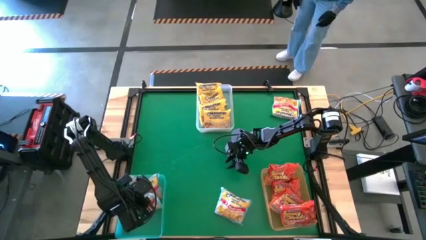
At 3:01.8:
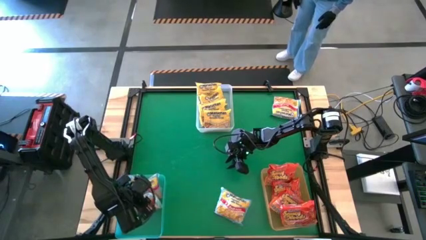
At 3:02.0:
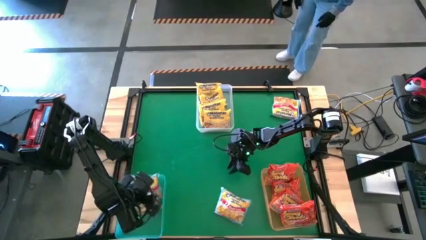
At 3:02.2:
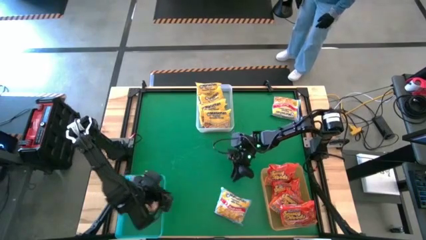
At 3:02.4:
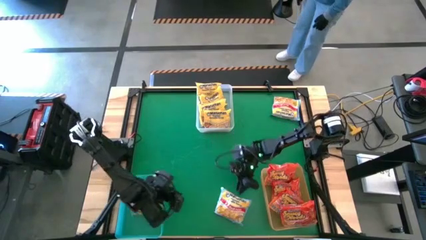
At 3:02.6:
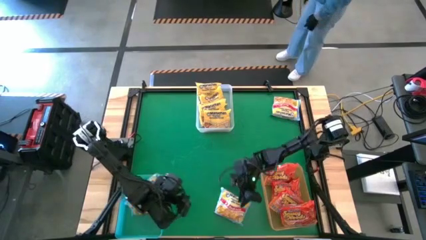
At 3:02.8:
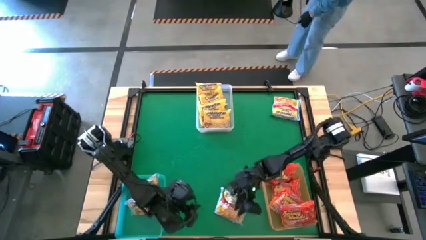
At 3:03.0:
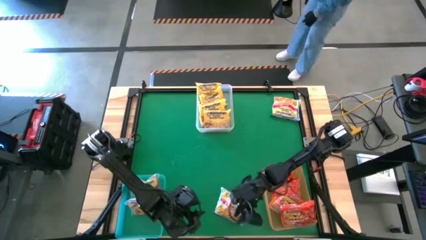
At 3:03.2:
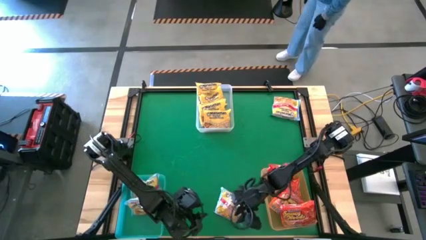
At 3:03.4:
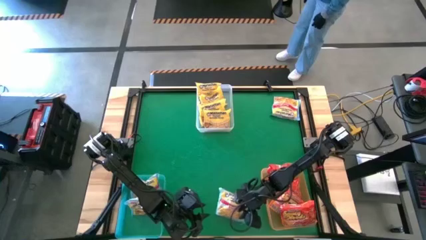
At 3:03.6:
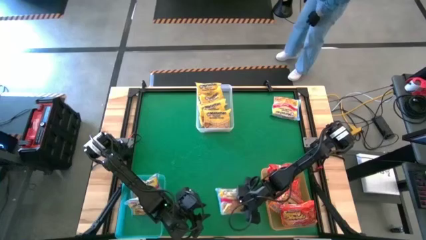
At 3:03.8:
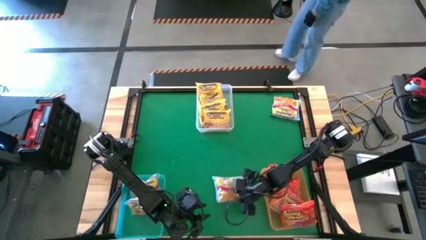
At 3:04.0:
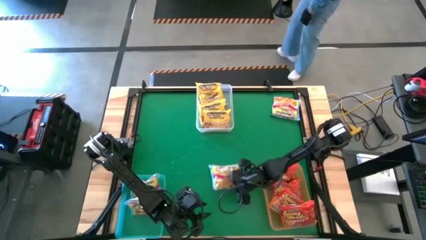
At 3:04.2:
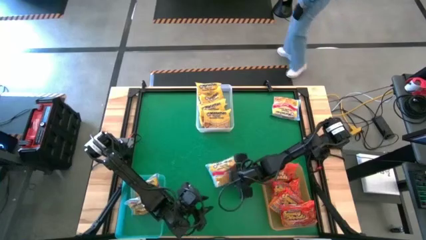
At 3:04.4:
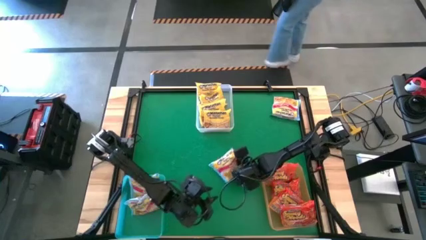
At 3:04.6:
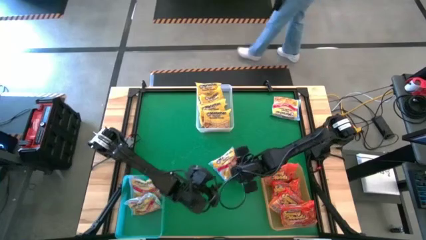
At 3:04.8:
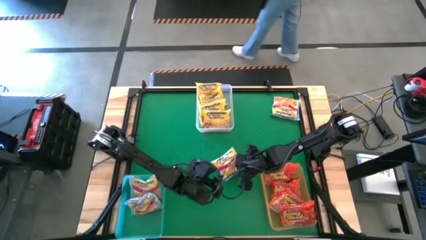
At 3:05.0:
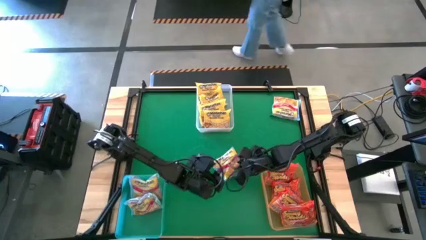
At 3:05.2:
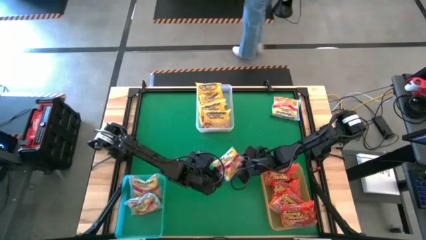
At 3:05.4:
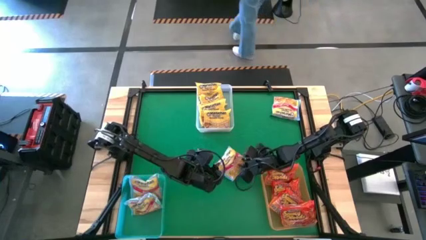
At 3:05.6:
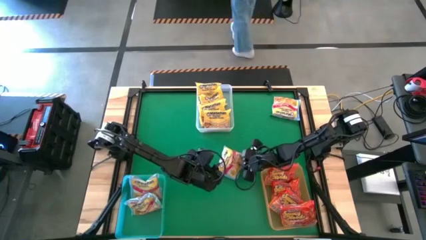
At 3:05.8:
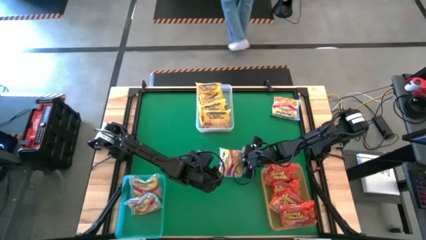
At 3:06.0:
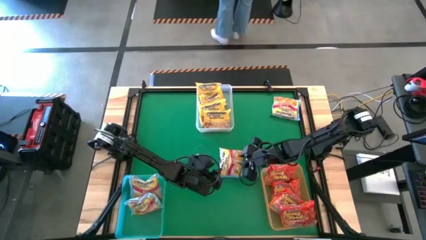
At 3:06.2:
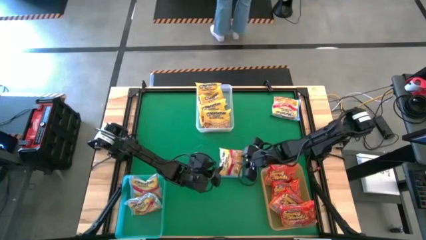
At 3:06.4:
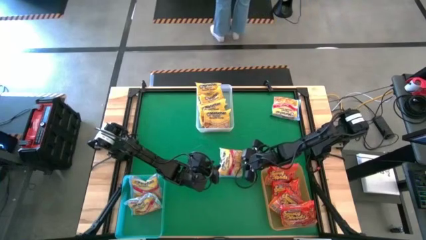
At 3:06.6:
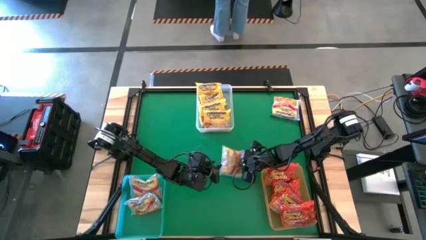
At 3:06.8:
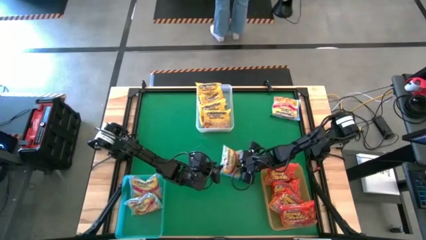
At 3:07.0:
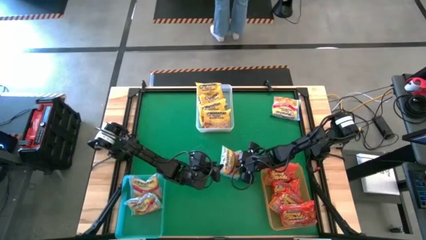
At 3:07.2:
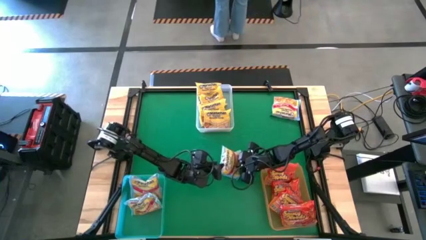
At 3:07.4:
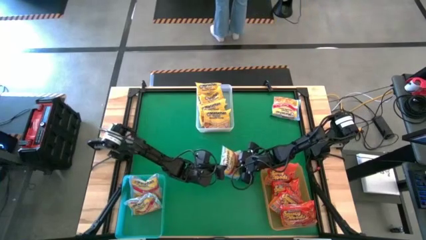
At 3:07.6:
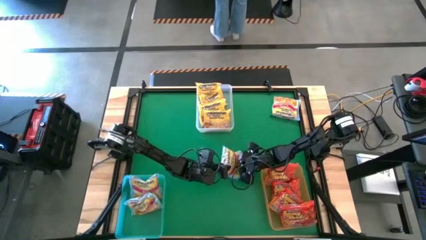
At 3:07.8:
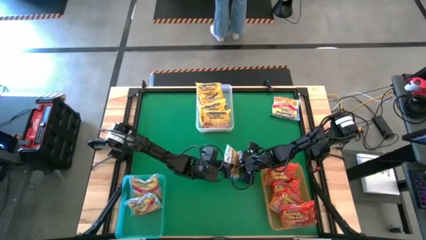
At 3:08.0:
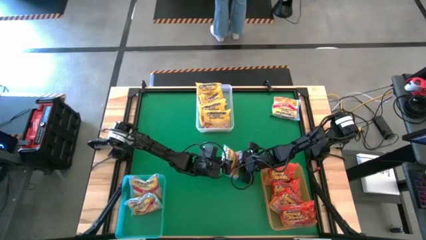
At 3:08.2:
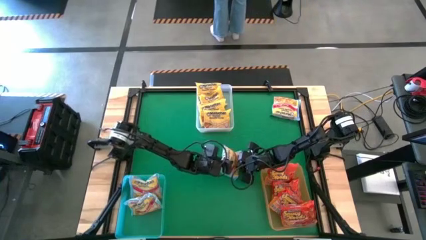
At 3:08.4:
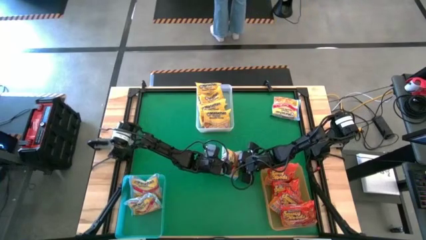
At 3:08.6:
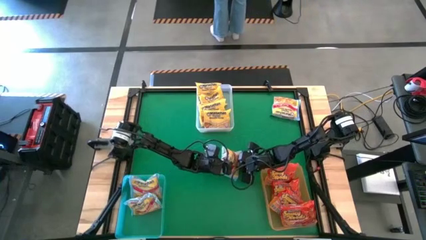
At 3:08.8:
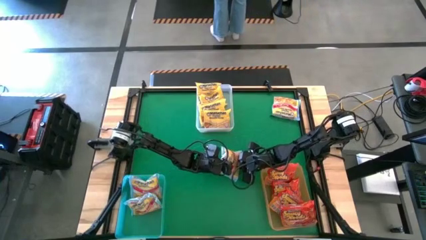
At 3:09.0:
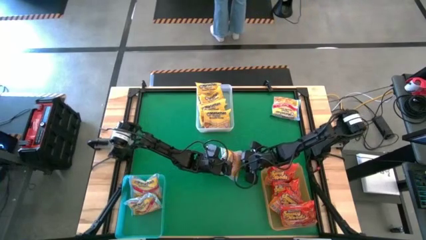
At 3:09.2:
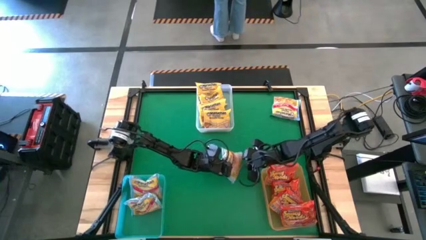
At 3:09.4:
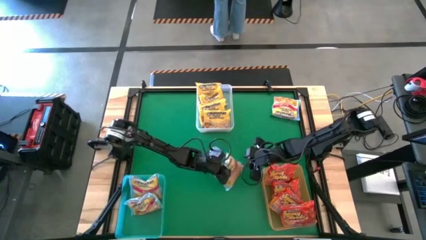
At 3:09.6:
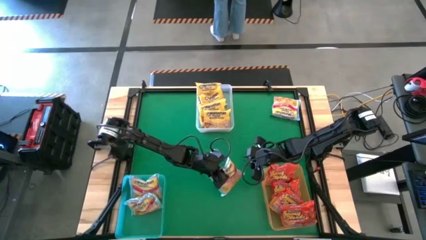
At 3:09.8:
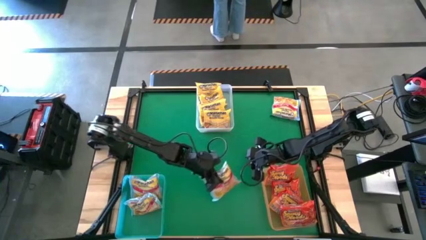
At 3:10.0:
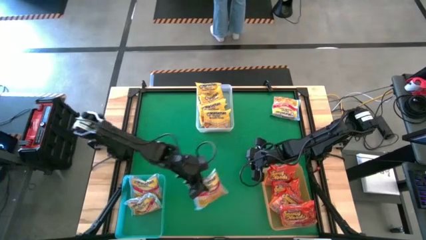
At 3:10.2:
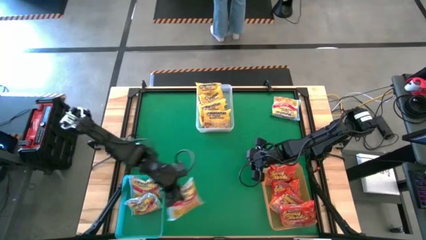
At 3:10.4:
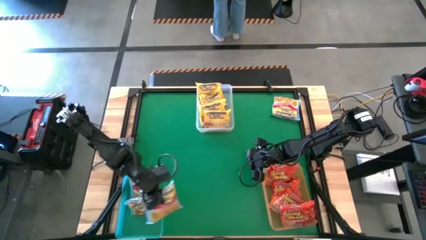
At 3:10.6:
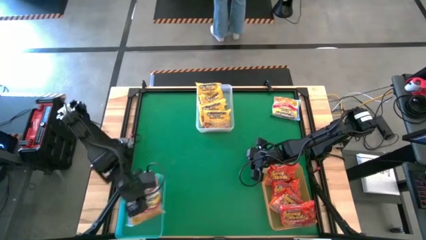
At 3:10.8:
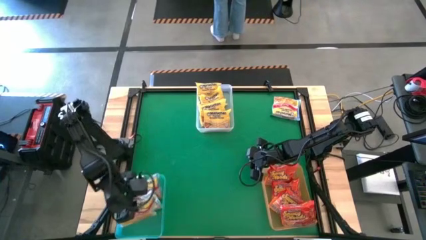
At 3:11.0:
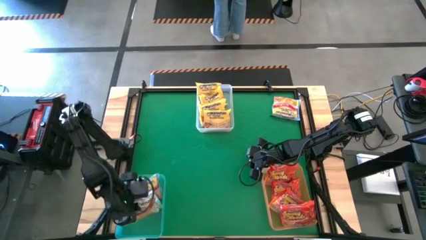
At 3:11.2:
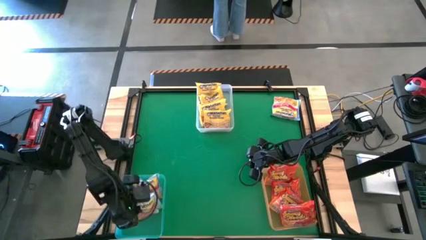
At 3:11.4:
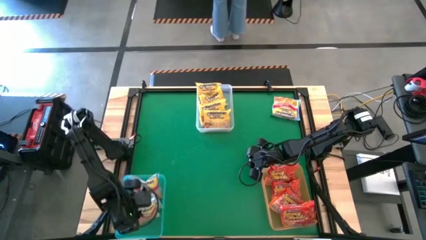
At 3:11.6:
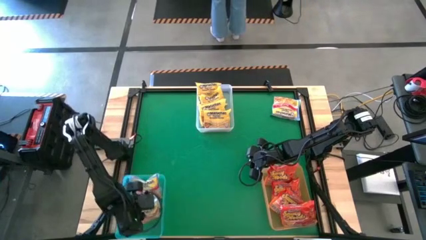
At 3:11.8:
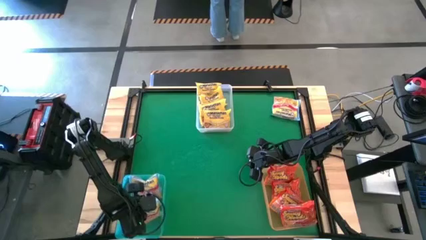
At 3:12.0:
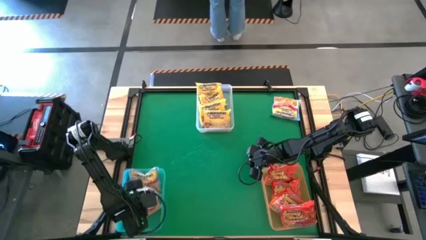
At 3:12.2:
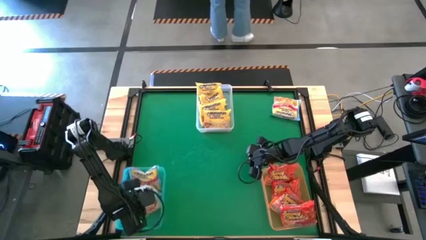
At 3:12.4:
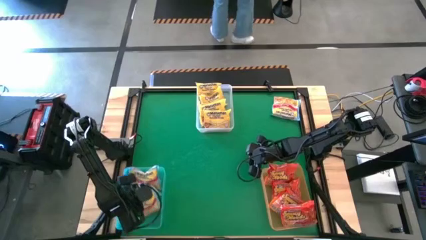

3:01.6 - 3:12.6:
Task: Sort Maruchan noodles
Put the bottom blue noodle pack into the blue bin

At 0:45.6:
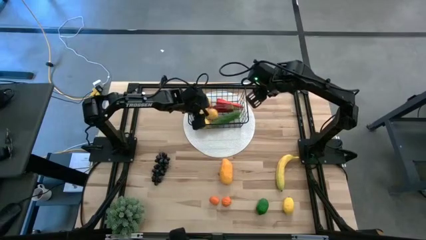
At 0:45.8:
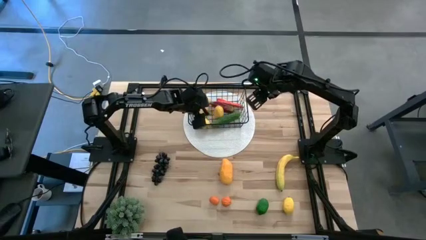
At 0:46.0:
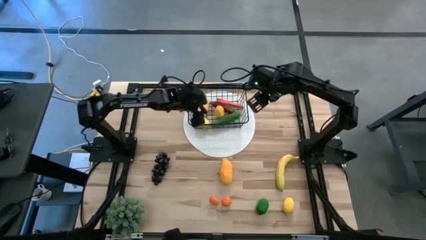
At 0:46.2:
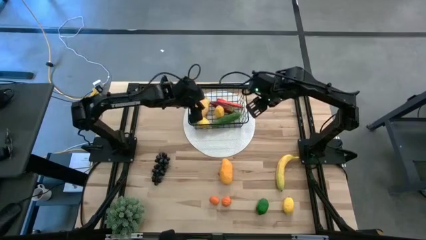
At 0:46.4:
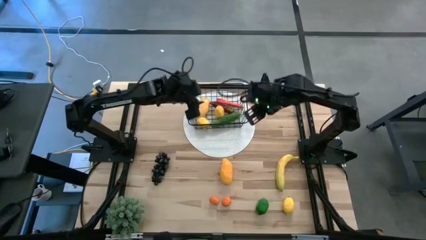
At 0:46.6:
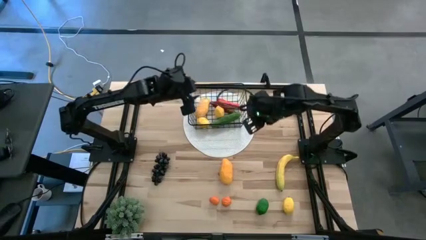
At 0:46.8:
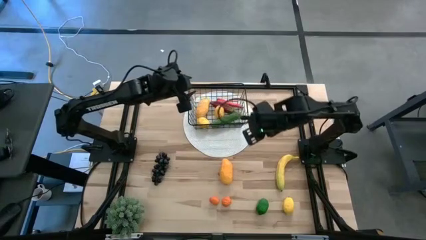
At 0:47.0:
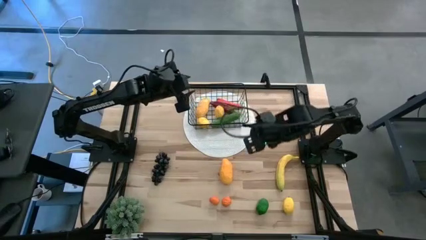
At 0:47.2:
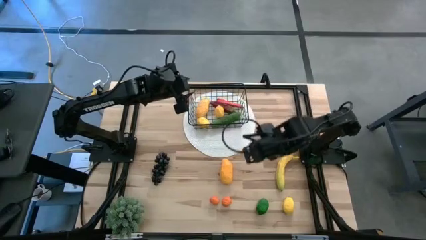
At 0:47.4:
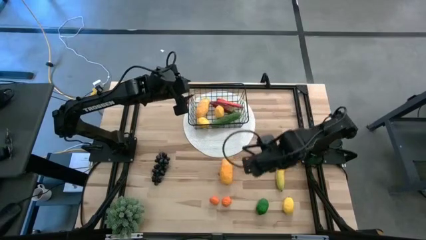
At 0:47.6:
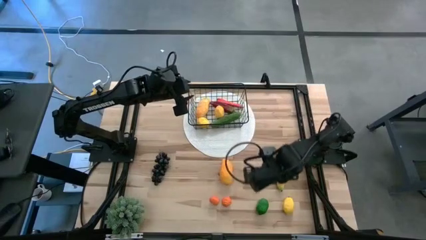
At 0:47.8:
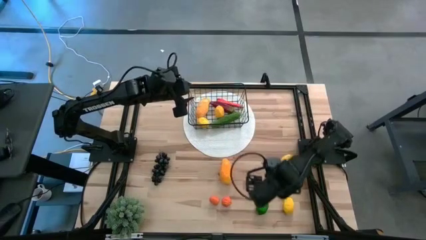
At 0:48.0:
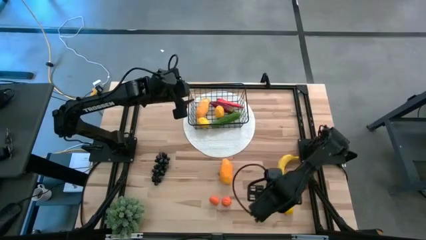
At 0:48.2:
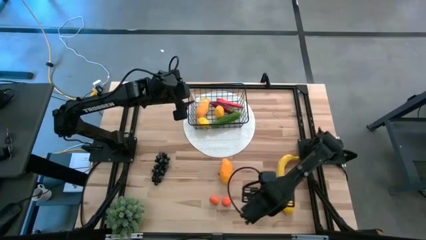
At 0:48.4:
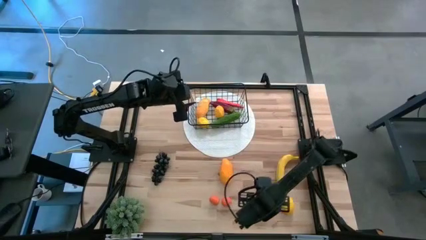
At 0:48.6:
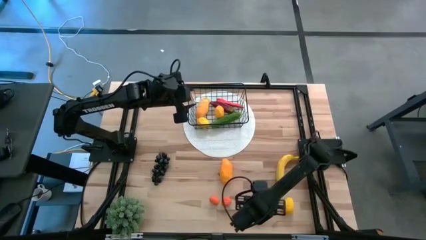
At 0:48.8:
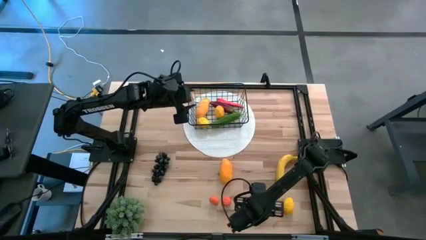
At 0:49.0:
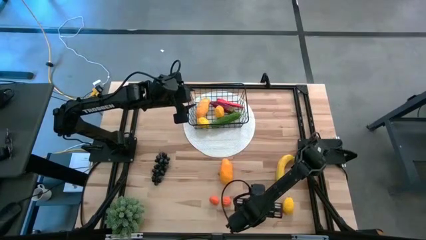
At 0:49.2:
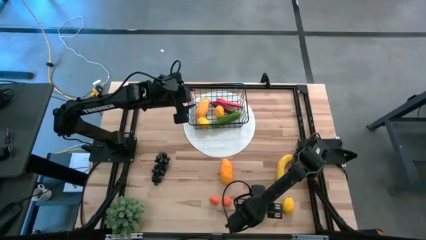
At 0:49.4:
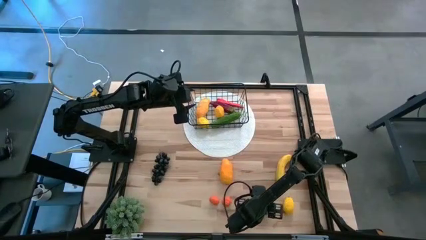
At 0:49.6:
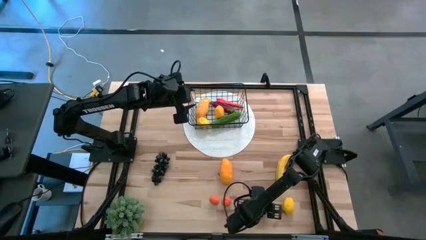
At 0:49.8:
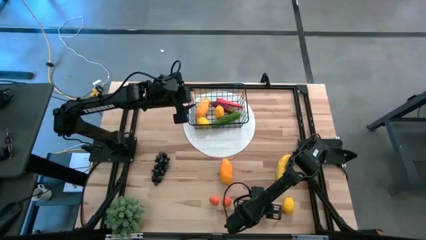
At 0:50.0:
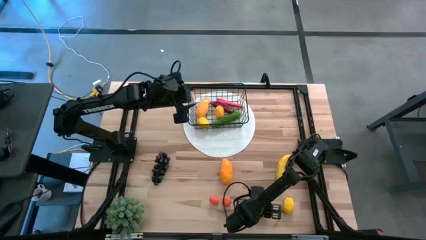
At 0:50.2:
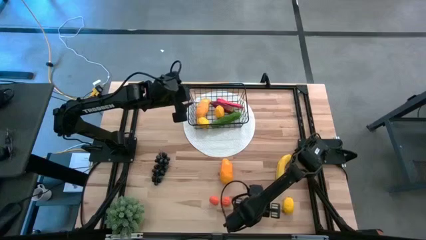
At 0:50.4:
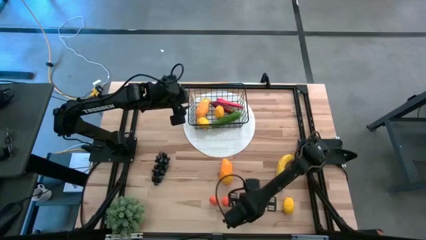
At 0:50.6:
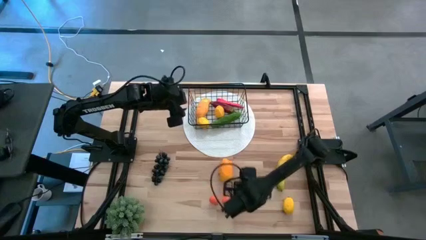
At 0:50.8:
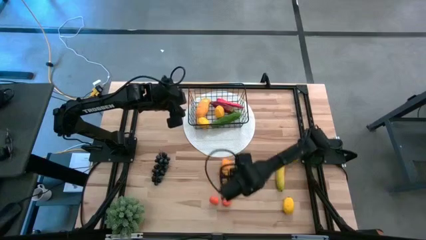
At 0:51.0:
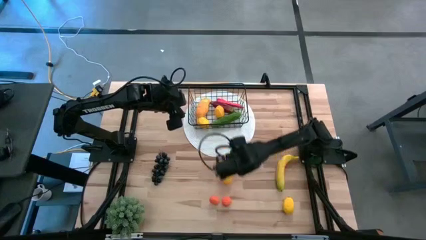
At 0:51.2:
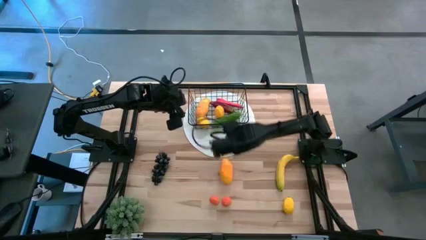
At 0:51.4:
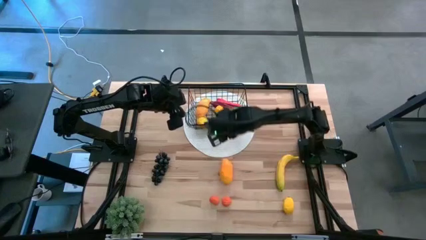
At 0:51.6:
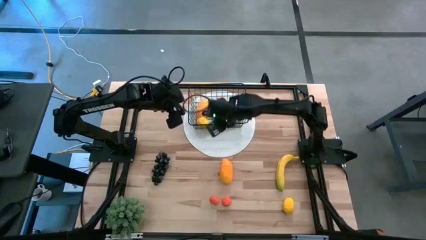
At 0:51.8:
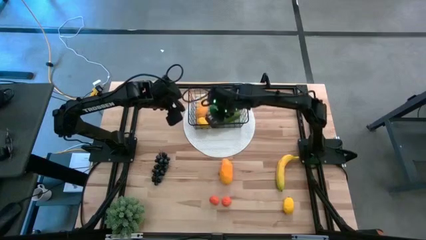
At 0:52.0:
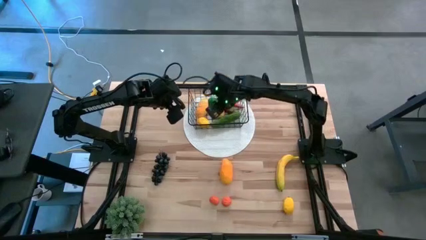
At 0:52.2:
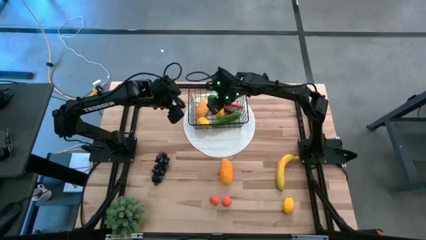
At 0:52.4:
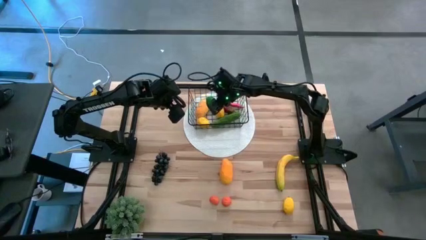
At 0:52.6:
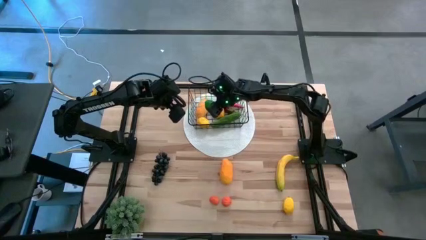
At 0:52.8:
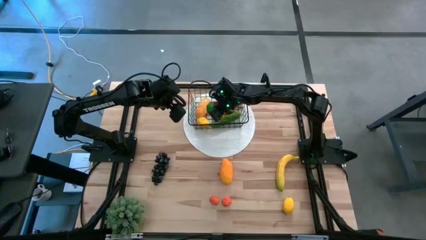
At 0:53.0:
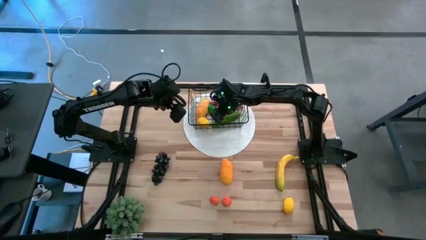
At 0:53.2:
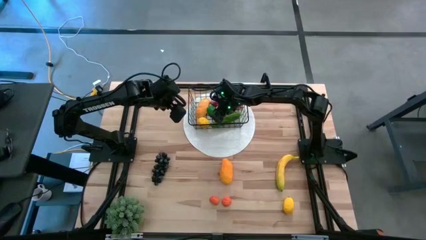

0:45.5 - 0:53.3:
Task: Build produce basket
Put the green lemon into the black basket
